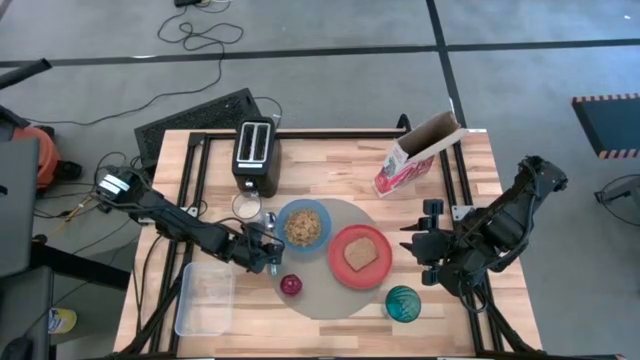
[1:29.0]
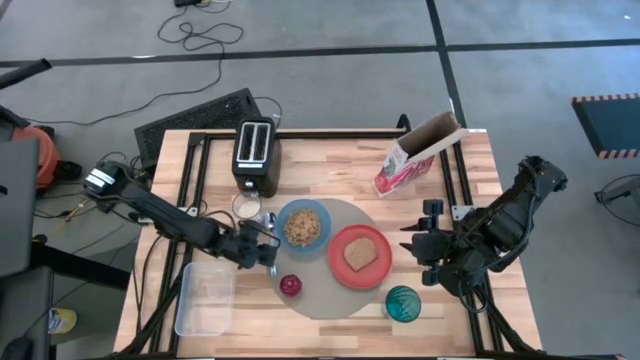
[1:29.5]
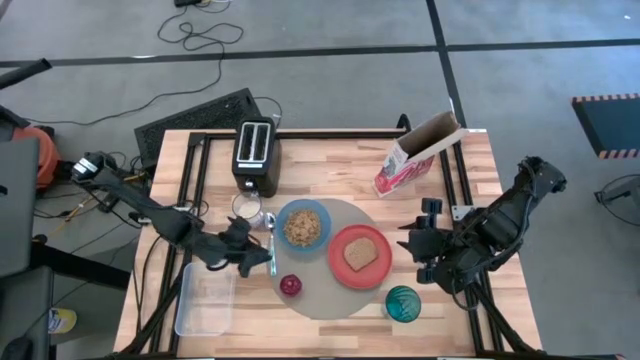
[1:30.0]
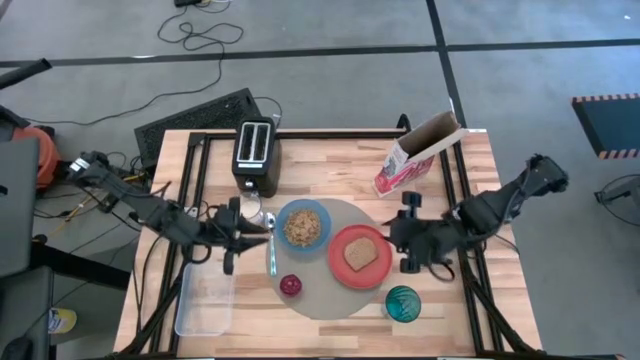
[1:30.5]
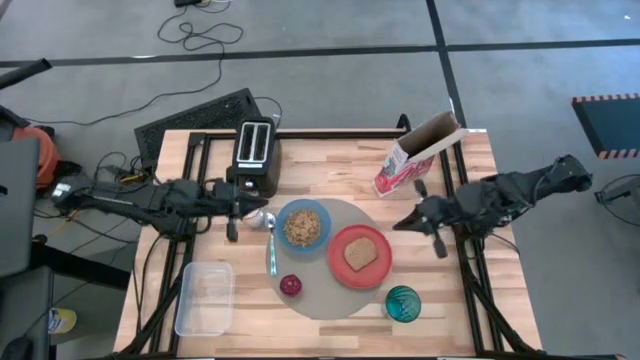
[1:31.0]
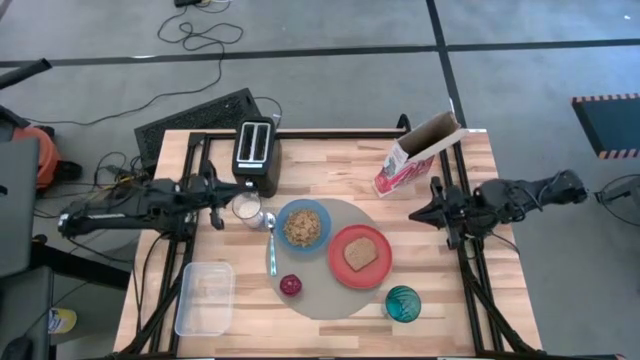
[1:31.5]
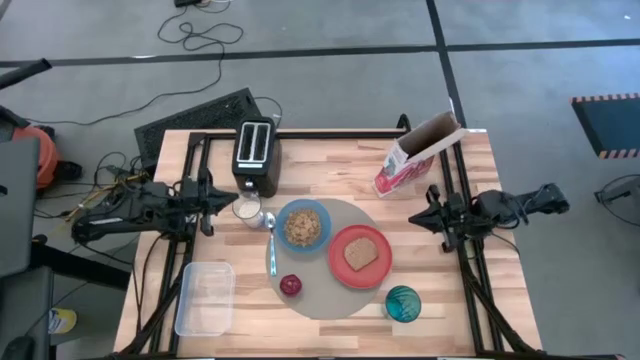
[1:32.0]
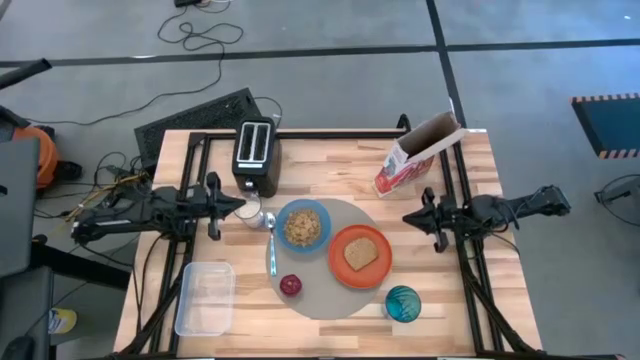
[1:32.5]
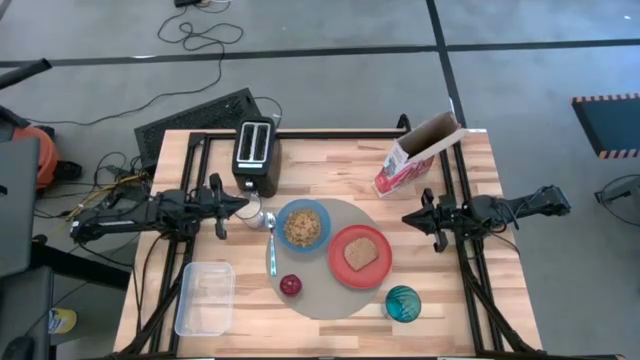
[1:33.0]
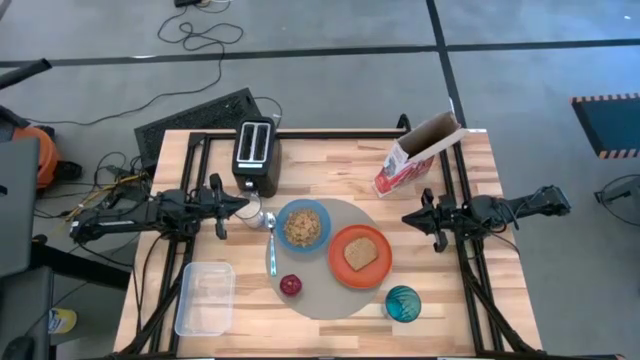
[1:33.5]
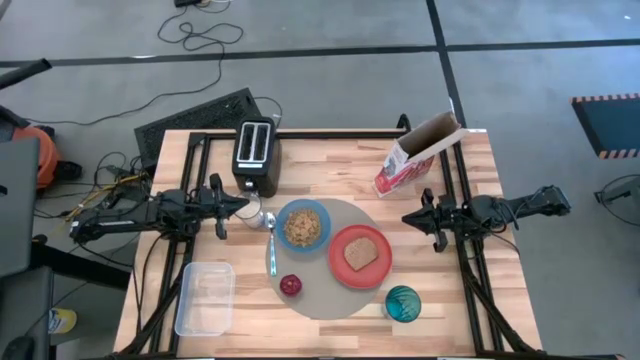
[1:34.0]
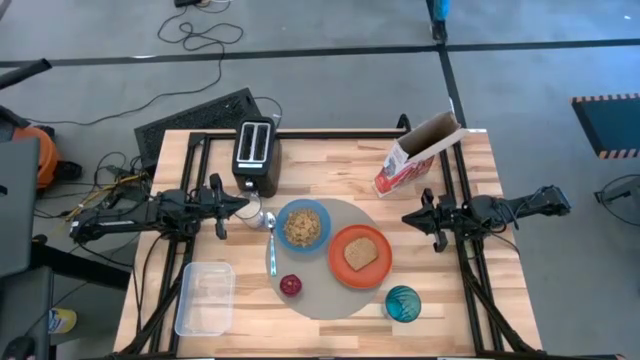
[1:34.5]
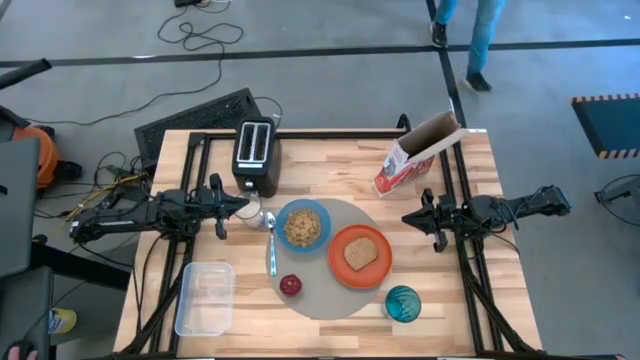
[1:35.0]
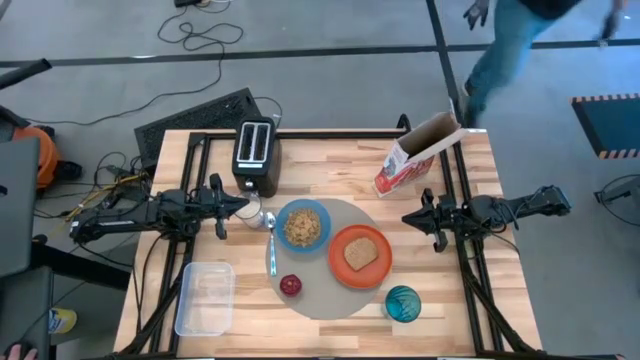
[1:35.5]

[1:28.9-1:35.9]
Task: Arrange a breakfast setting
Return to Home Position

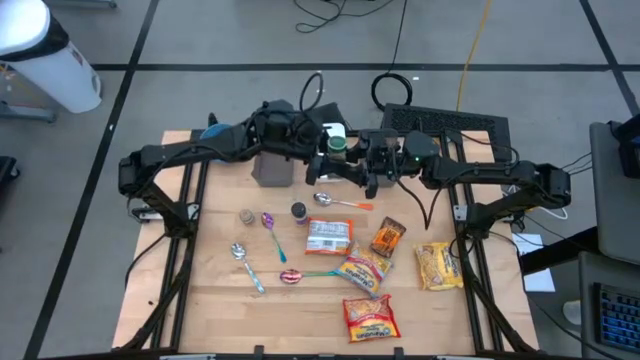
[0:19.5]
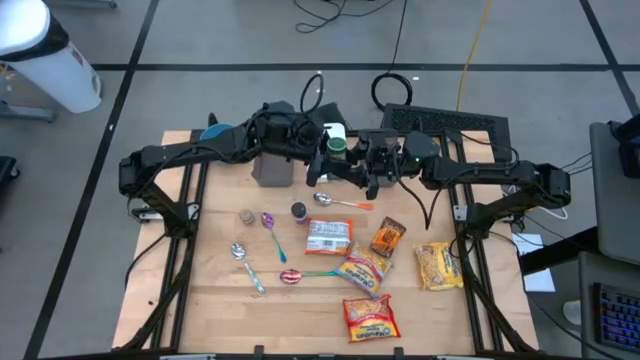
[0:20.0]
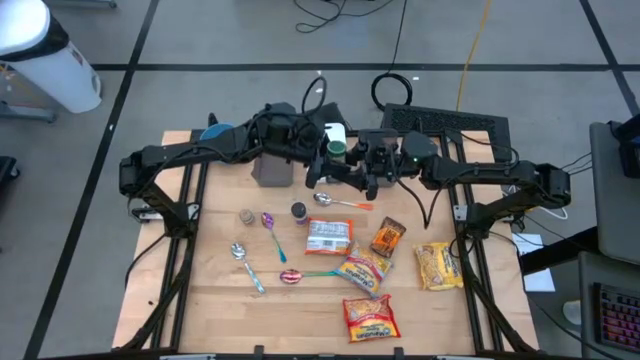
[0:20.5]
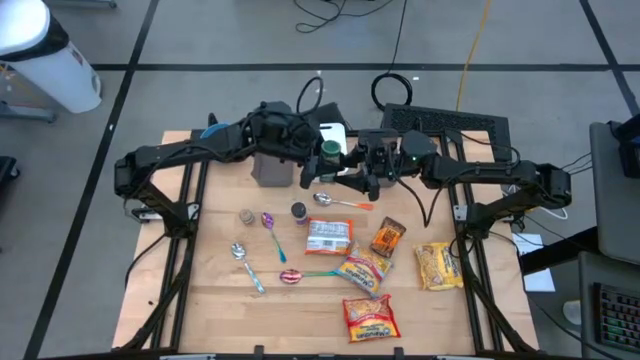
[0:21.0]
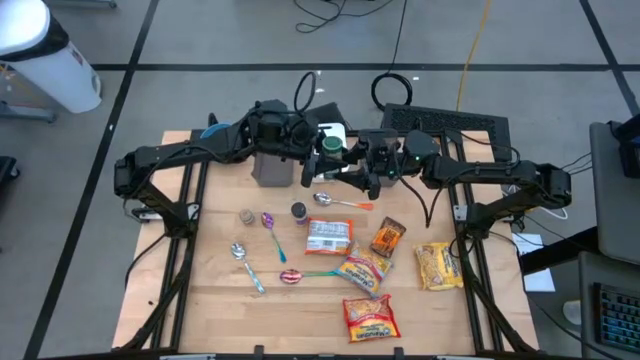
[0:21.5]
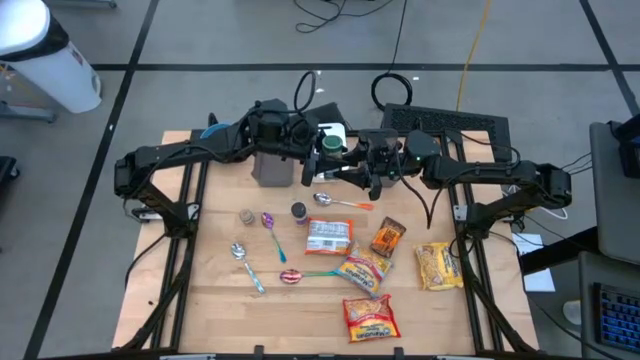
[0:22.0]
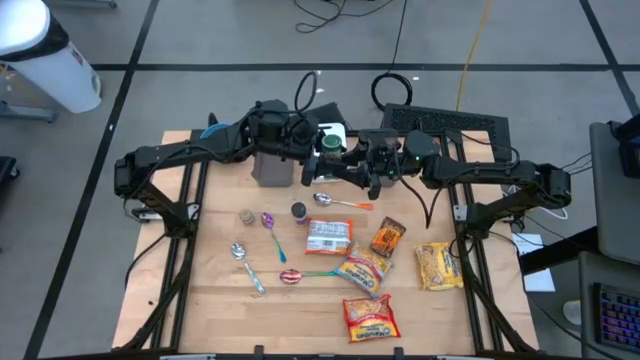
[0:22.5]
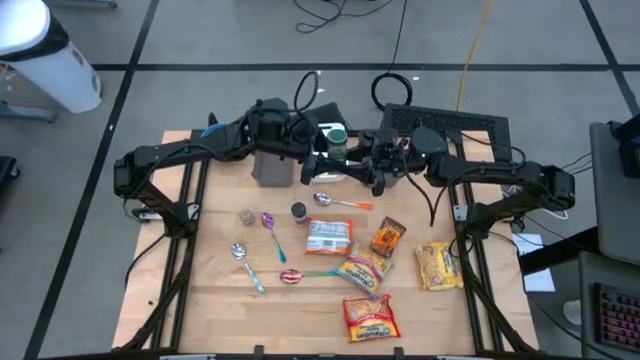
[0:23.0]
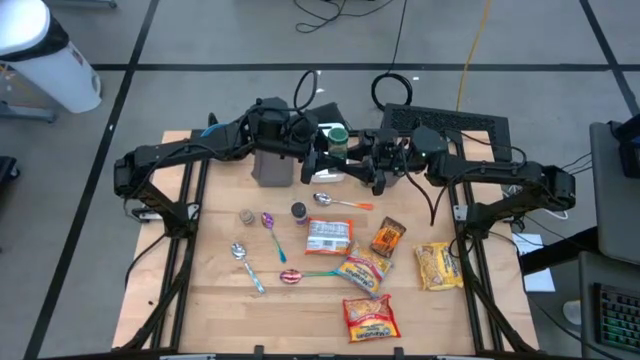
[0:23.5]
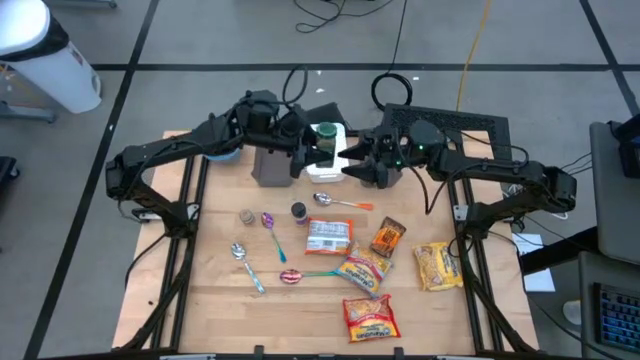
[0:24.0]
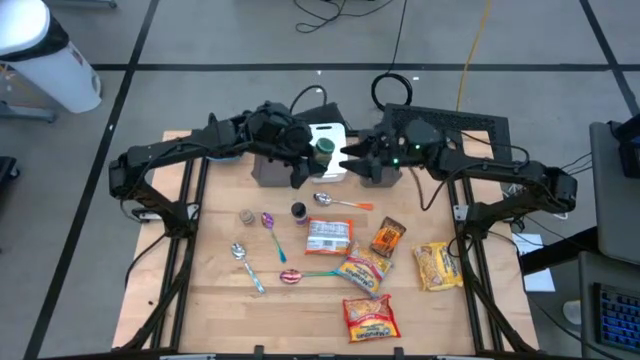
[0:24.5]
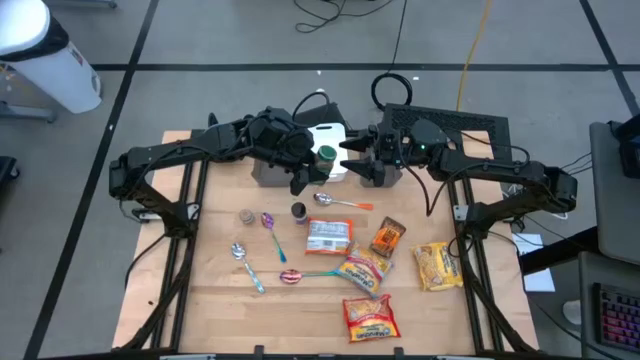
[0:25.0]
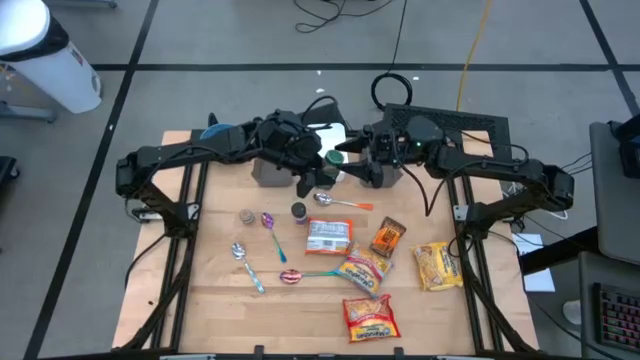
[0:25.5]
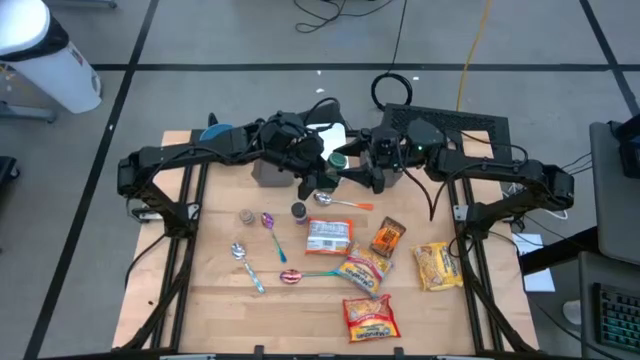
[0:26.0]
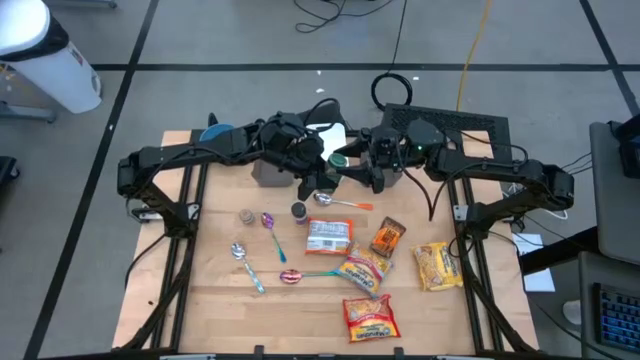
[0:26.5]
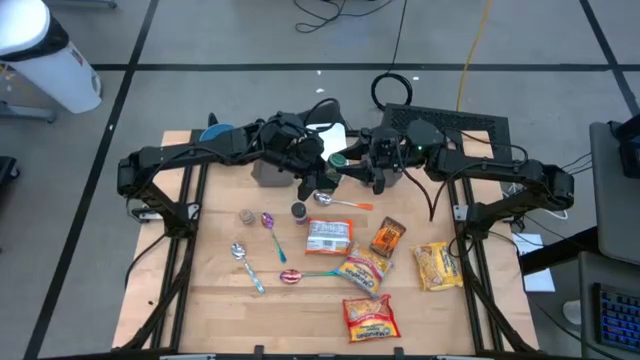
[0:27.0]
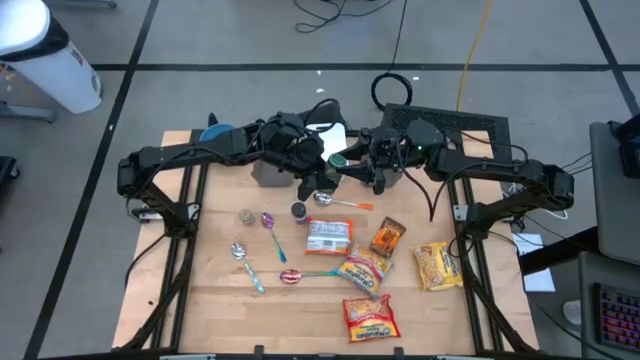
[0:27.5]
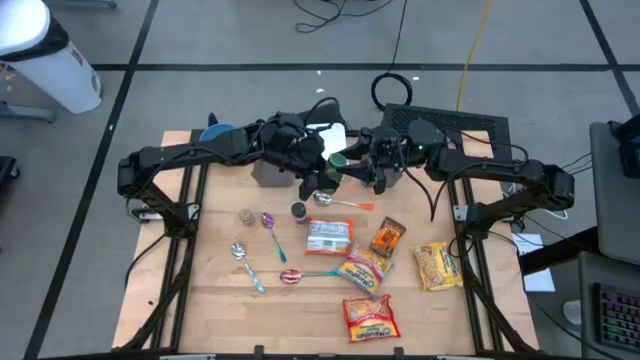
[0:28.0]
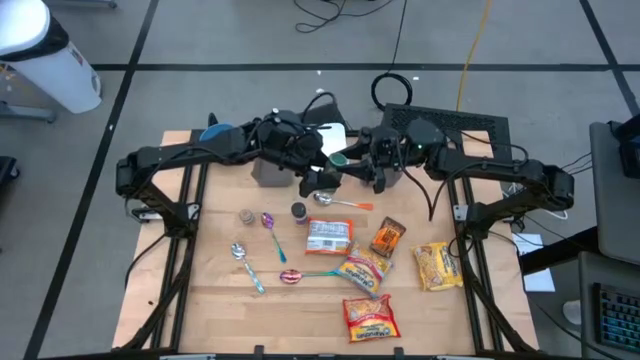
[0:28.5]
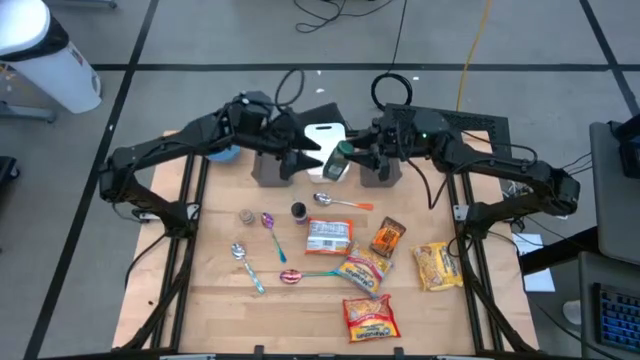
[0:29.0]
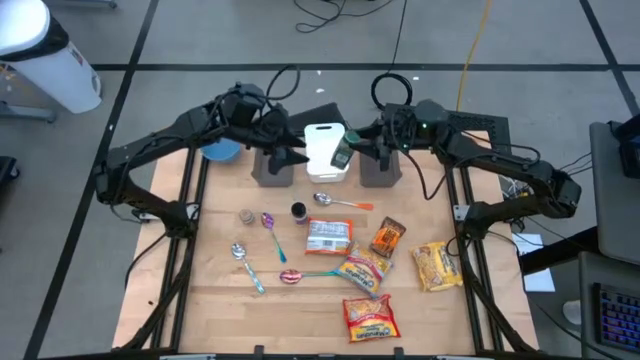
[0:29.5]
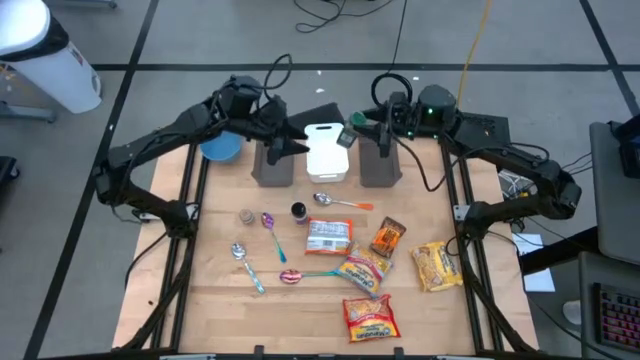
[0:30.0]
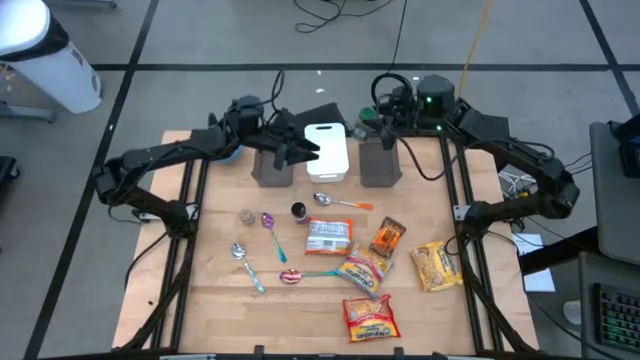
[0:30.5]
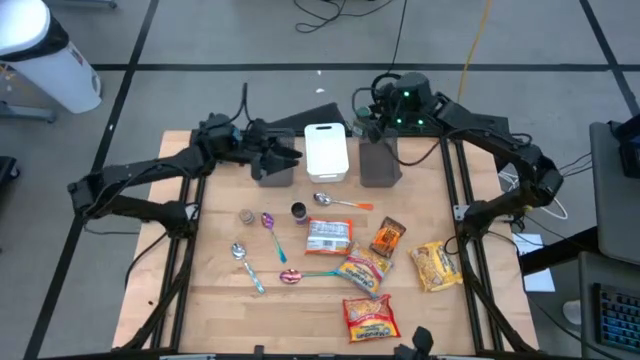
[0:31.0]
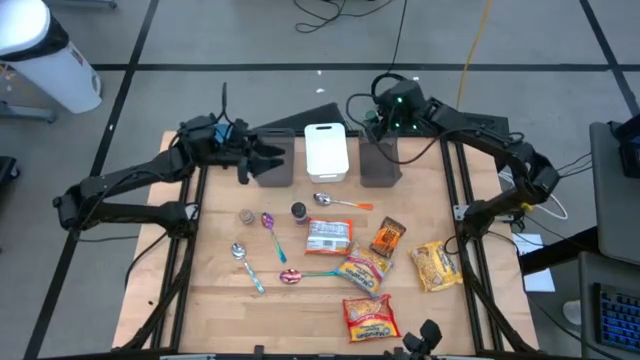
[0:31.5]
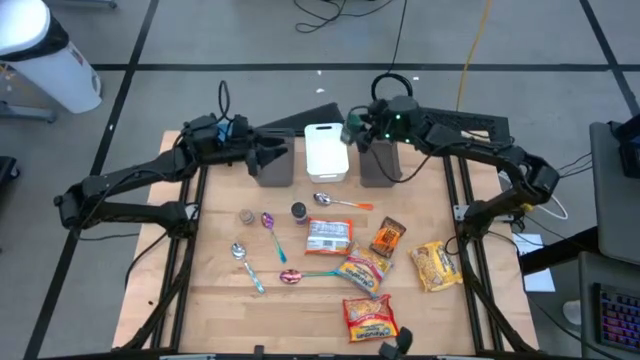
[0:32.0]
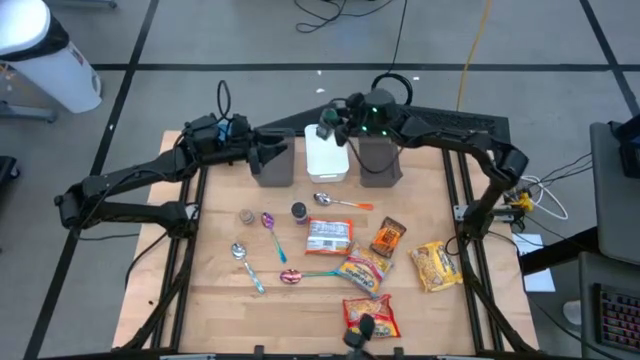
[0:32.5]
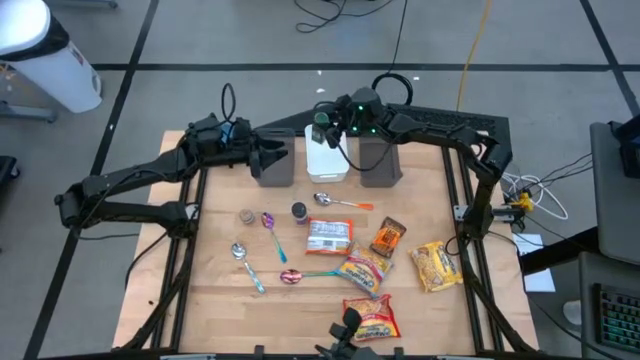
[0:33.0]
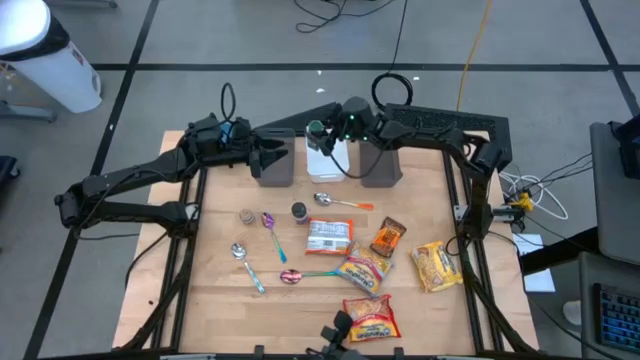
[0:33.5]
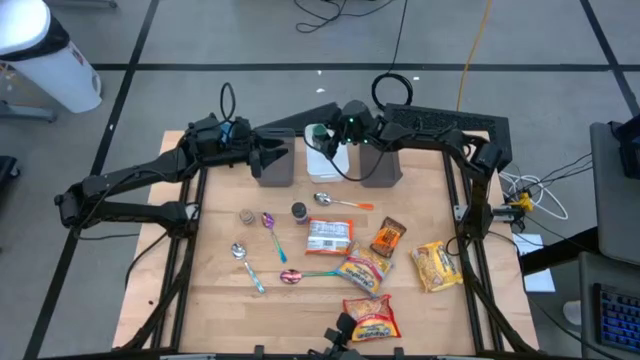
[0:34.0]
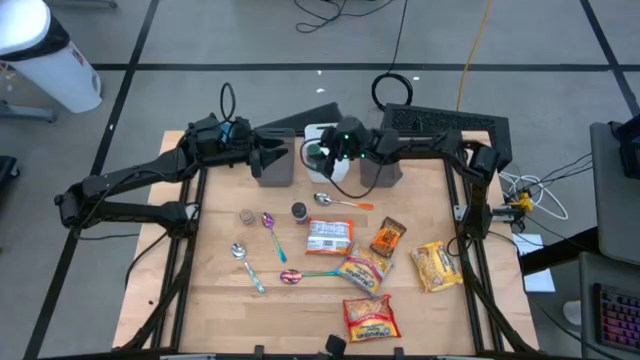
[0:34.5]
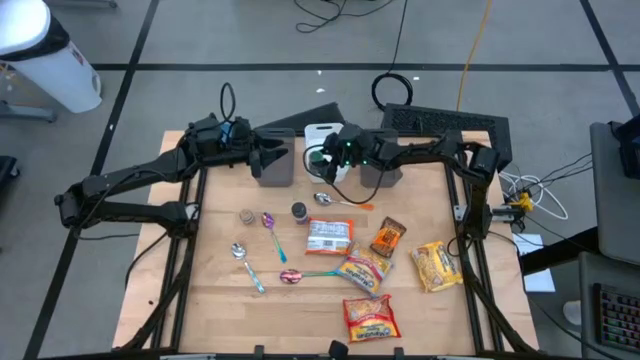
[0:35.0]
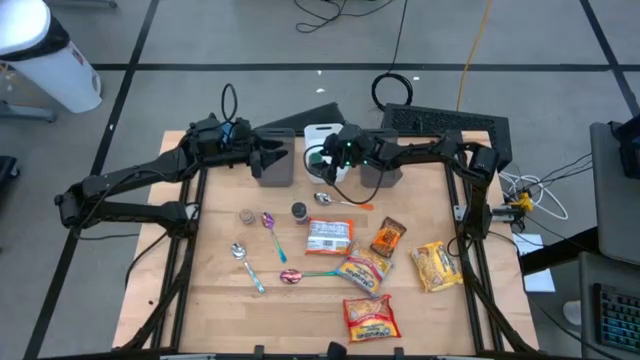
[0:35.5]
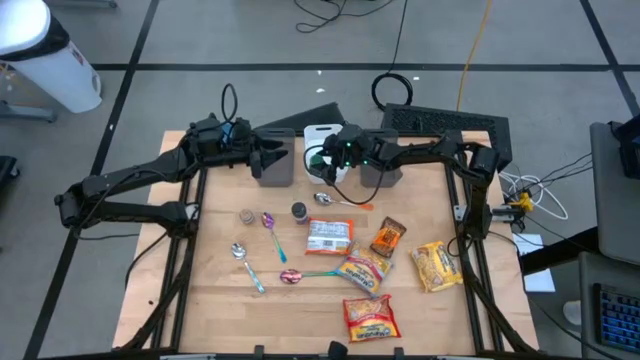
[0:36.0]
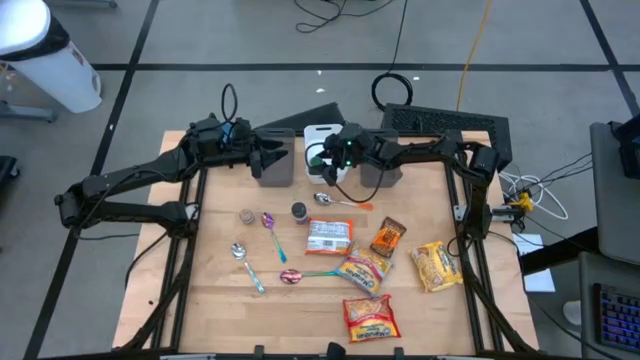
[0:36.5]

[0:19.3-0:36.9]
Task: Pick & Place Food Item
Put the green seasoning bottle into the white bin
